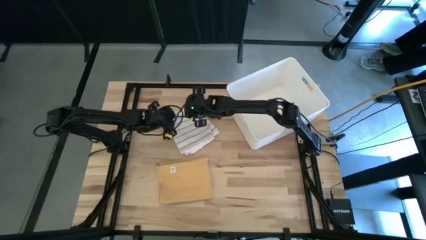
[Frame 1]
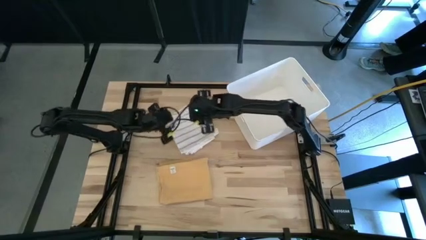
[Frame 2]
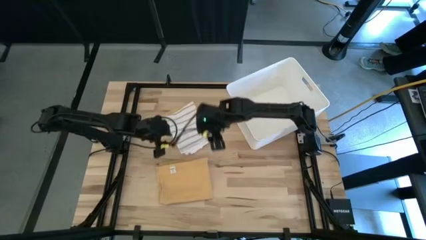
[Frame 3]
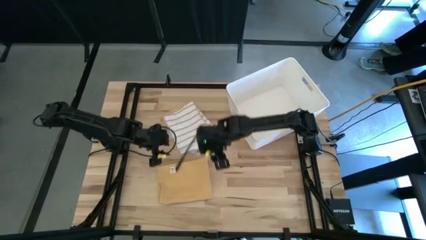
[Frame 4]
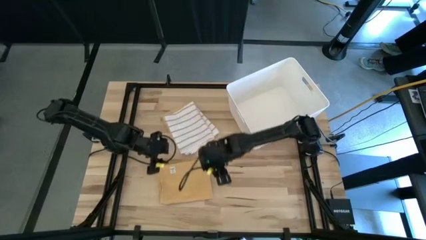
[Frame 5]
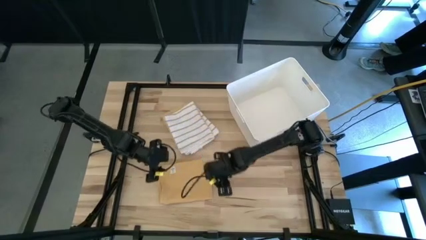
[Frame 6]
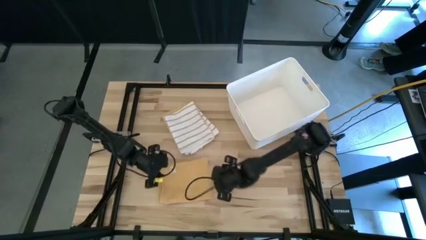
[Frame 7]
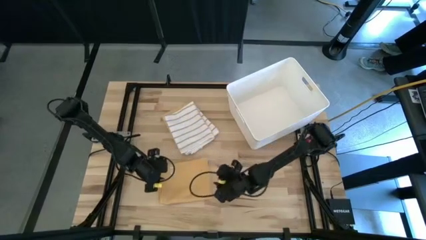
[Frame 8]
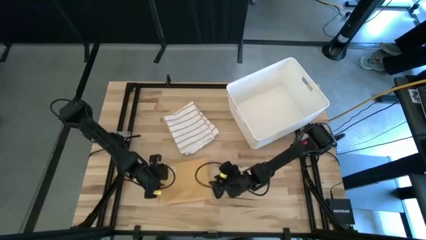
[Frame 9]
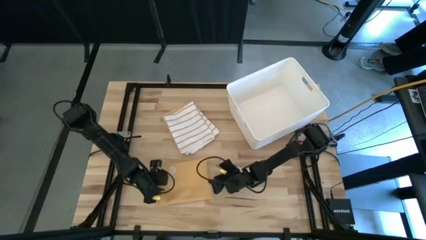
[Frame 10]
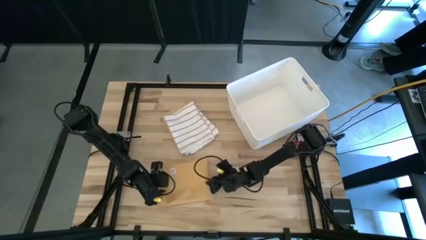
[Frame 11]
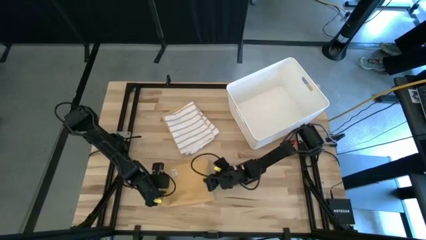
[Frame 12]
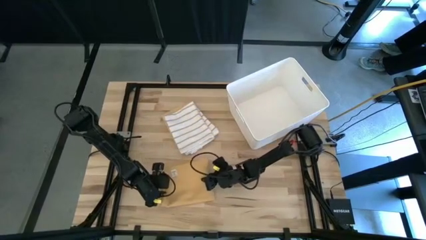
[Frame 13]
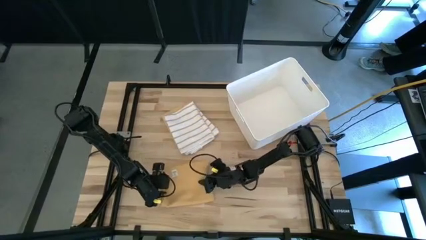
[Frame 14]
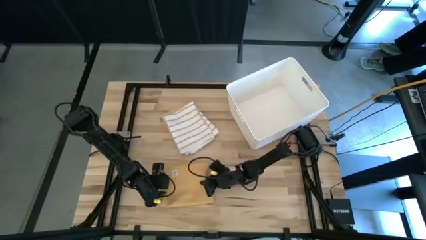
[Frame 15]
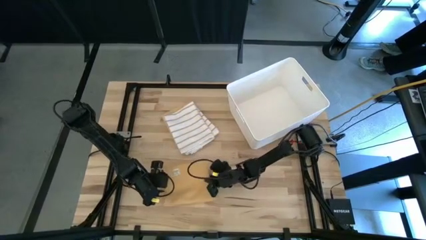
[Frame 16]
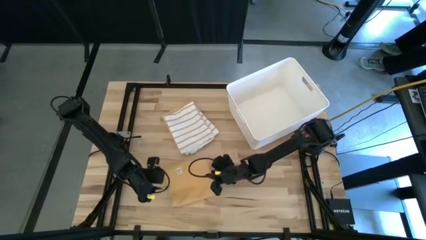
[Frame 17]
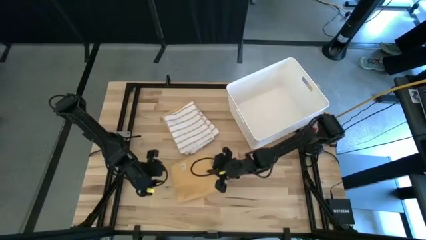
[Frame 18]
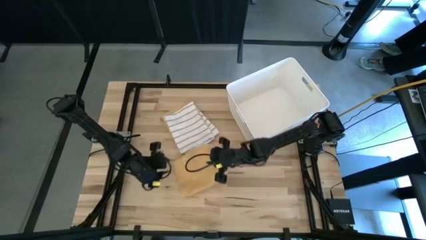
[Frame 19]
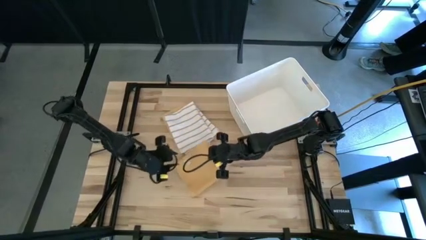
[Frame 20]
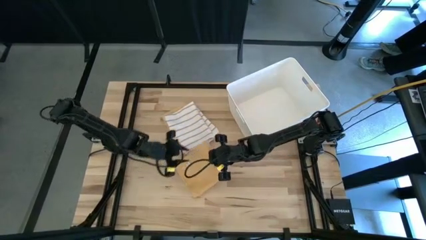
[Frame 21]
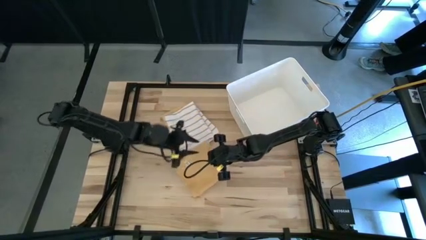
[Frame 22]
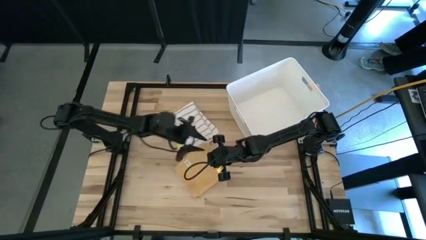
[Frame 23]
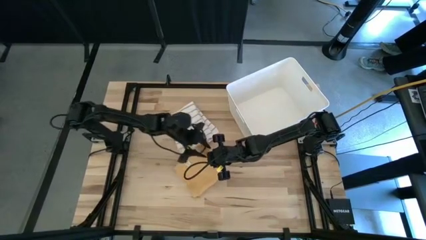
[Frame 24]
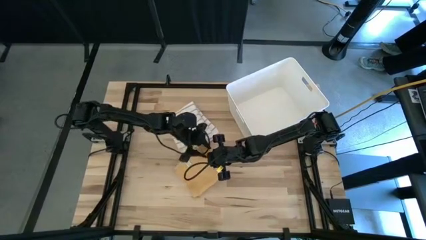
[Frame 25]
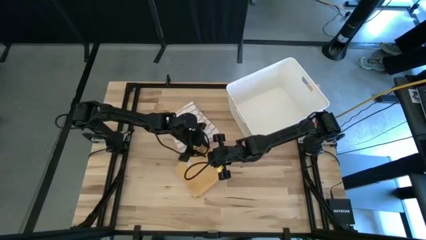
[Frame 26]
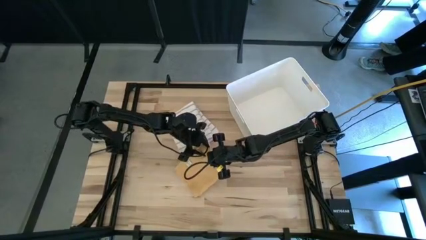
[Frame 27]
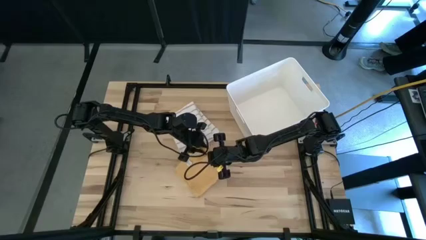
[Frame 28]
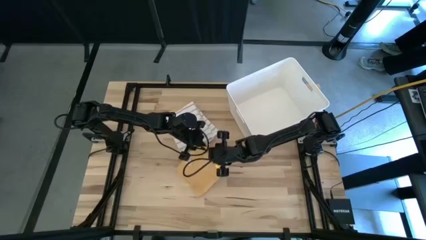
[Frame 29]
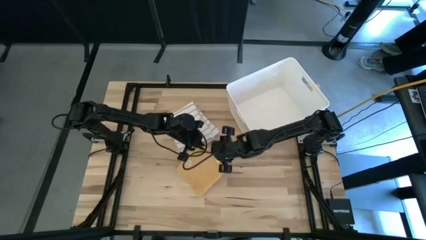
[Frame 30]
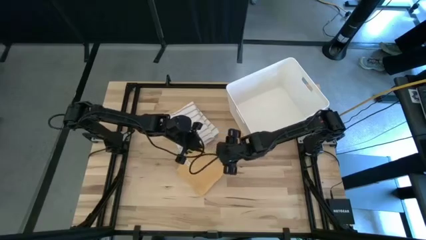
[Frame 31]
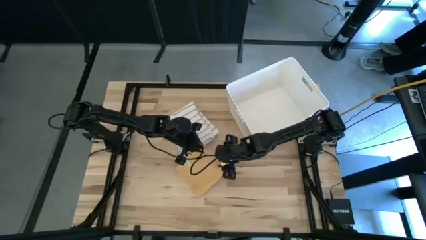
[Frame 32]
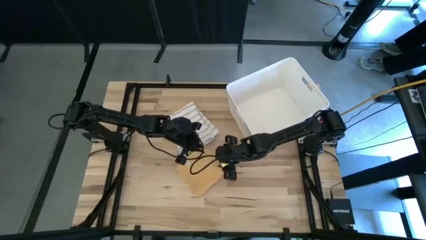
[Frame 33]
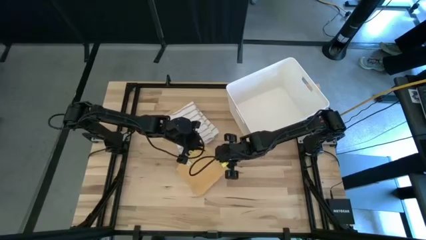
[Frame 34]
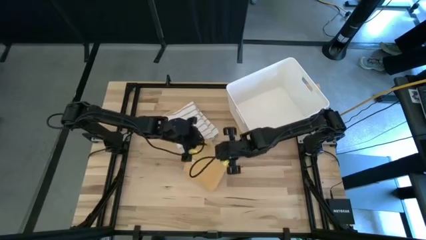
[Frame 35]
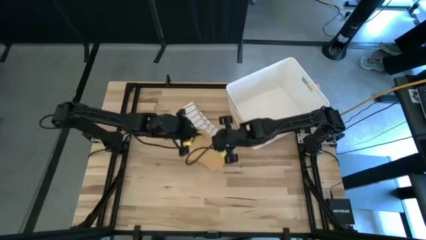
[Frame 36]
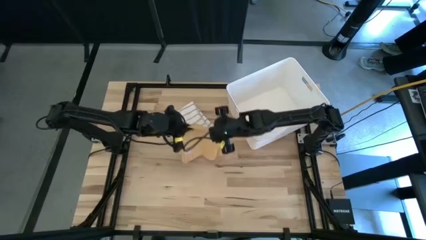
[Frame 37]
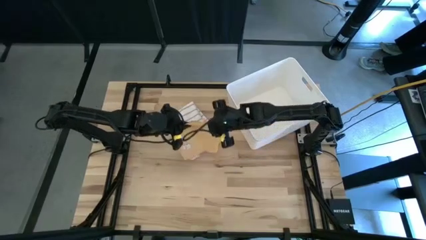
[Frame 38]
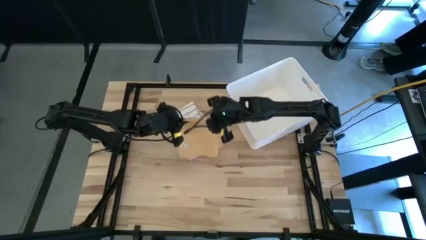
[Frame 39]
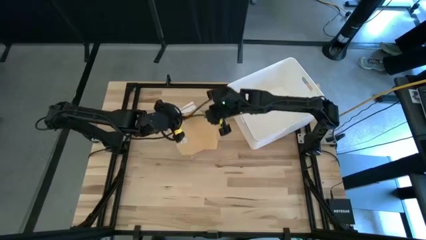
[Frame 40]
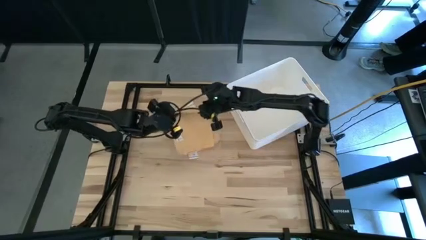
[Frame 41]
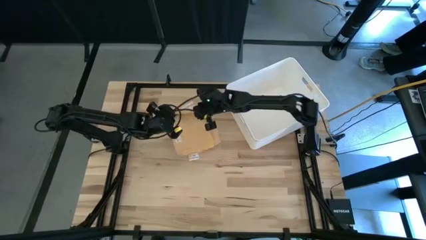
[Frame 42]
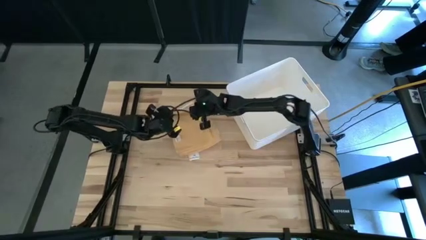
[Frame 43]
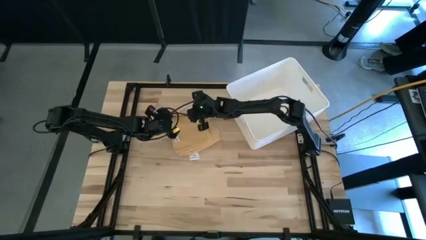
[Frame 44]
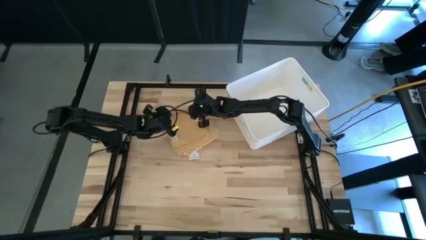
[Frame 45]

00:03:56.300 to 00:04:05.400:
Task: Fold towel
Stack the yellow towel on top of the white towel

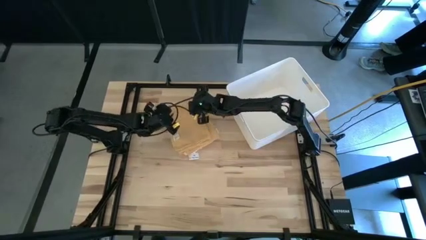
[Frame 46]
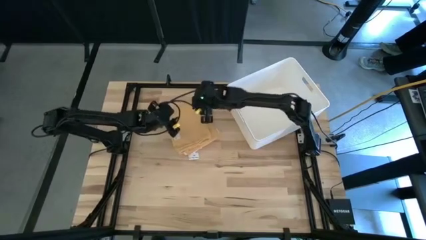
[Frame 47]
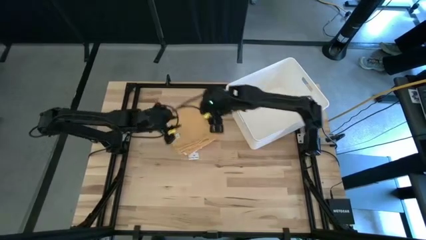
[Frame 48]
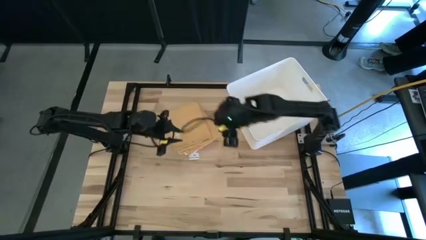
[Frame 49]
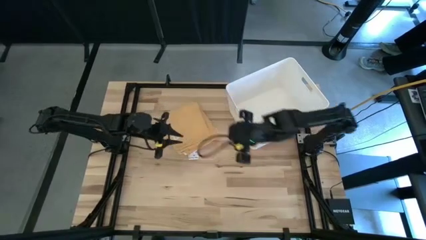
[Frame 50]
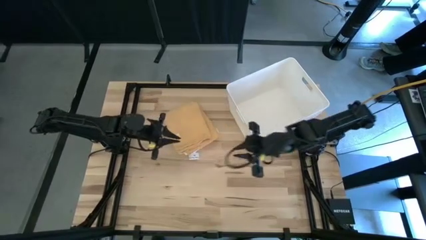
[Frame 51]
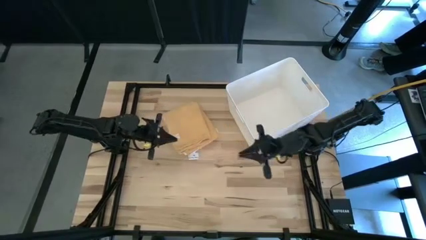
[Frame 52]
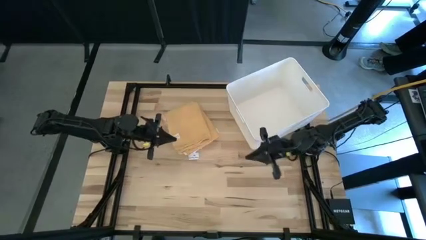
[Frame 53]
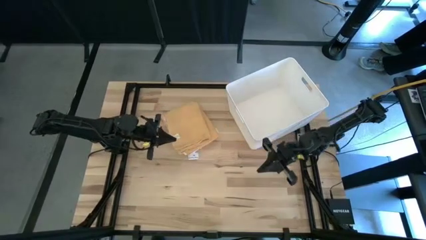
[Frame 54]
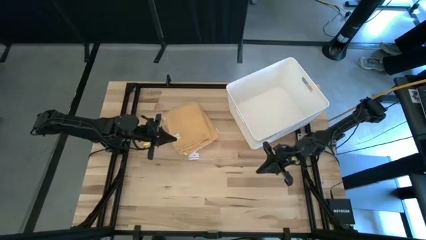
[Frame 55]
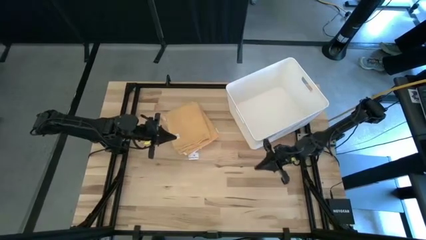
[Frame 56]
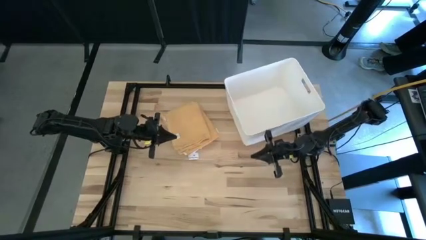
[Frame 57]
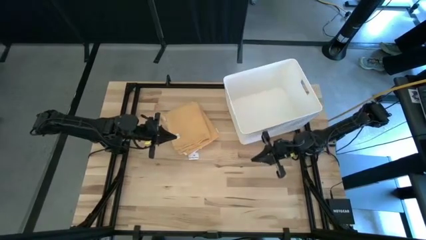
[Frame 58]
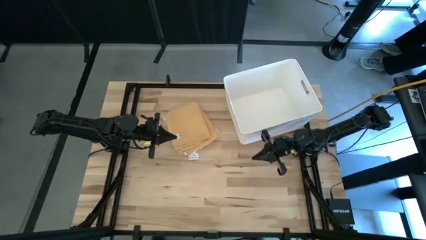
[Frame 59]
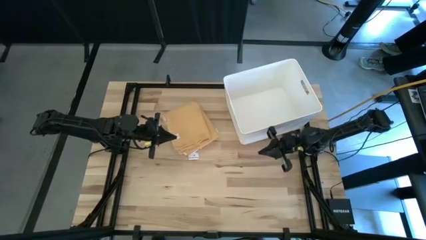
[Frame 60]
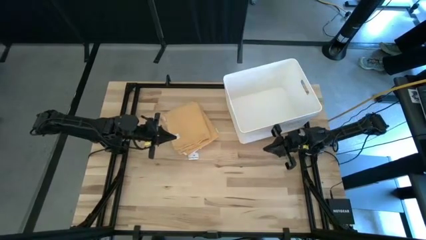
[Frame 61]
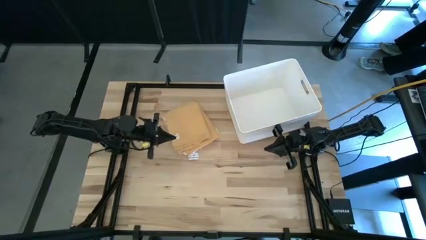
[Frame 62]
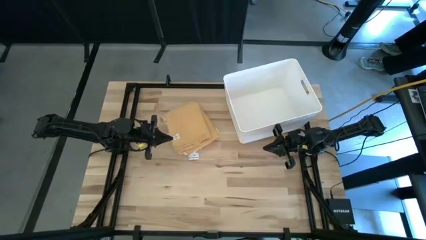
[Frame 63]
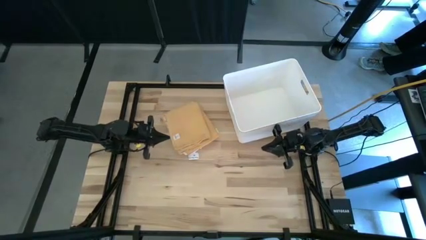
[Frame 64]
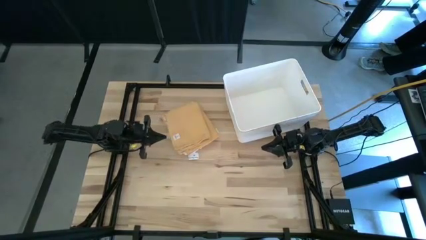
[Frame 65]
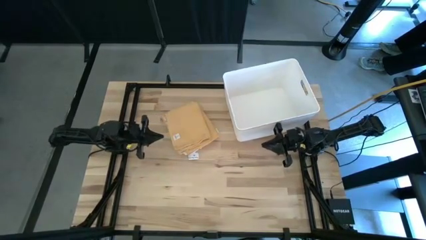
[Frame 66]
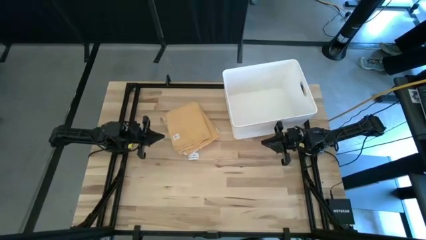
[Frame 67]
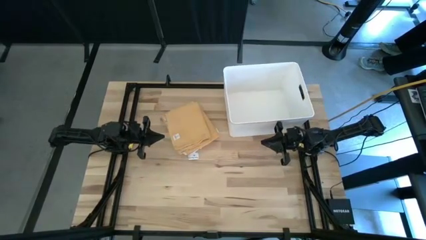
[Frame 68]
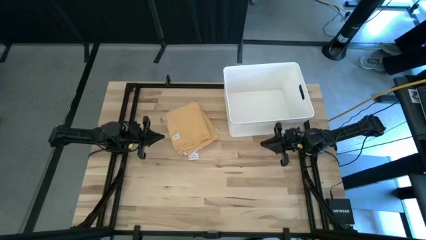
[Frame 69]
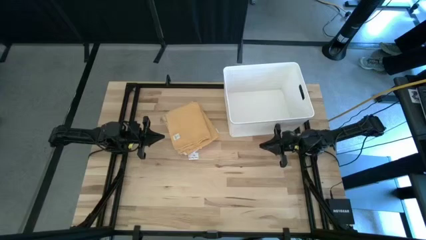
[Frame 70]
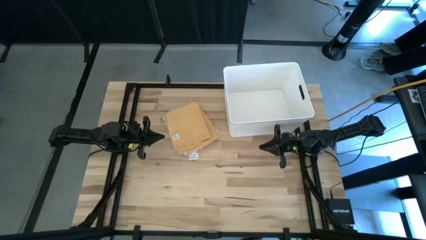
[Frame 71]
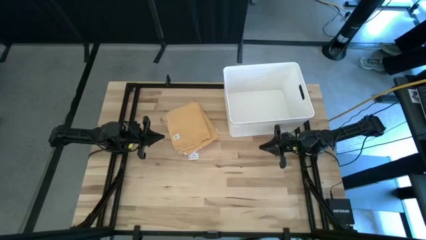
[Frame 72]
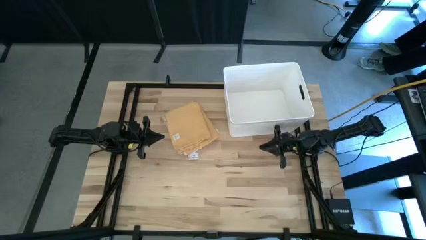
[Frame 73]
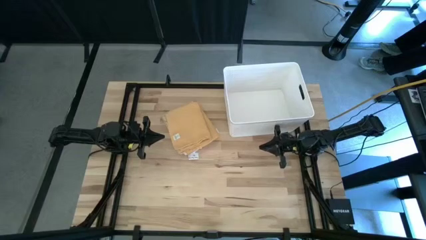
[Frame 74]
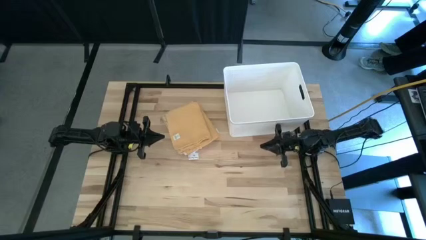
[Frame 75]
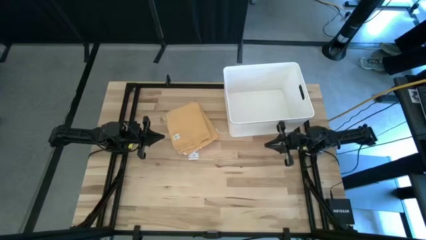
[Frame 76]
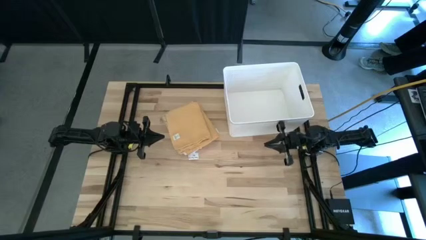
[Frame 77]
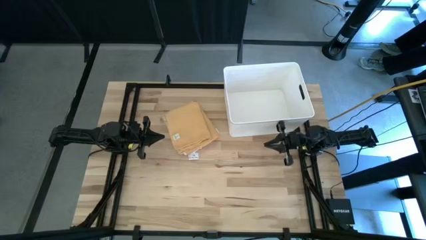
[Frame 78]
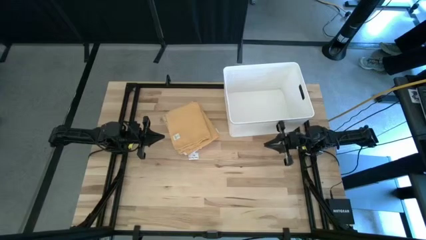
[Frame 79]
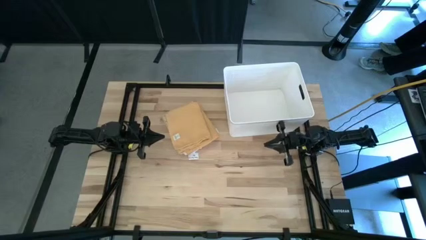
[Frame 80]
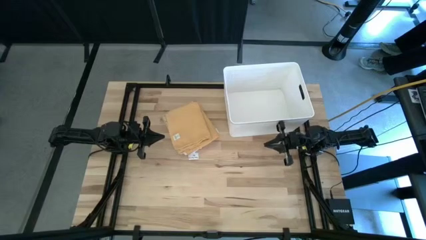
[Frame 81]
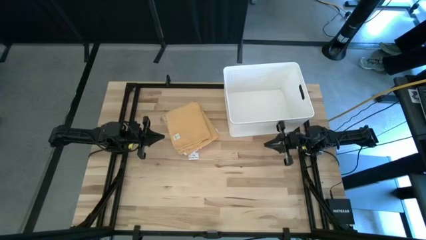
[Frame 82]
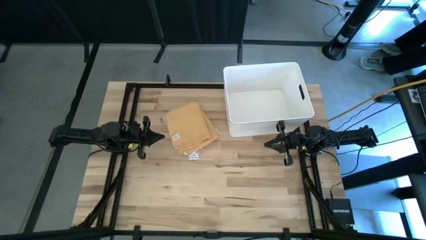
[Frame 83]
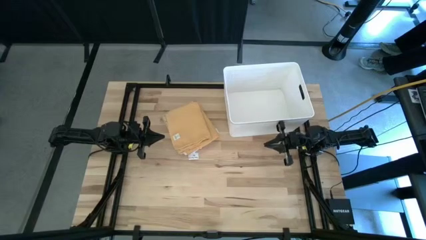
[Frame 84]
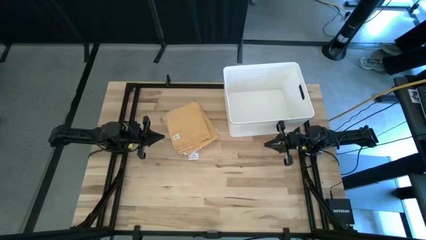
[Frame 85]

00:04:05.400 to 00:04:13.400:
Return to Home Position
